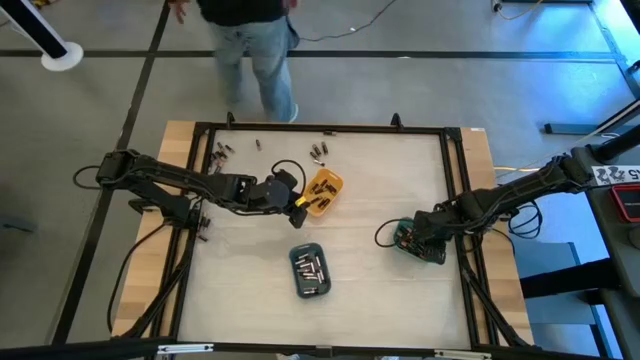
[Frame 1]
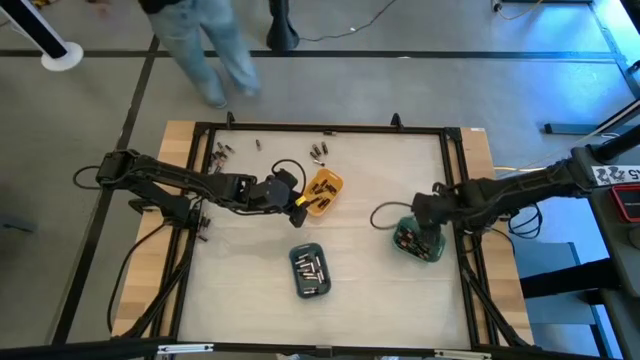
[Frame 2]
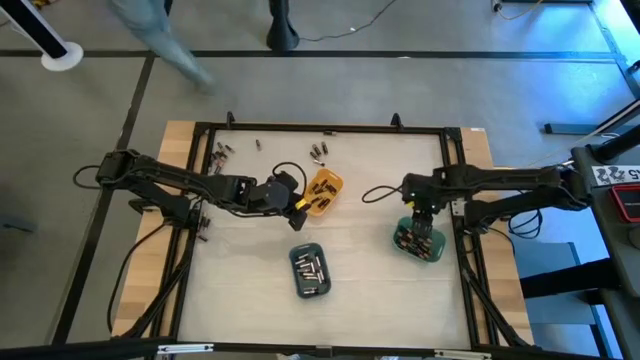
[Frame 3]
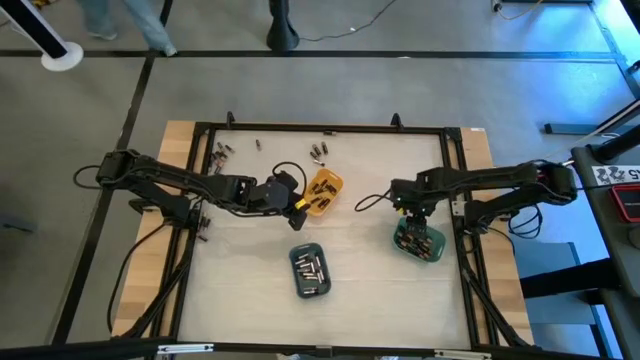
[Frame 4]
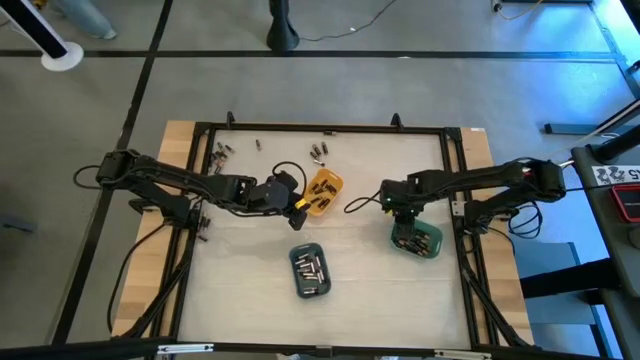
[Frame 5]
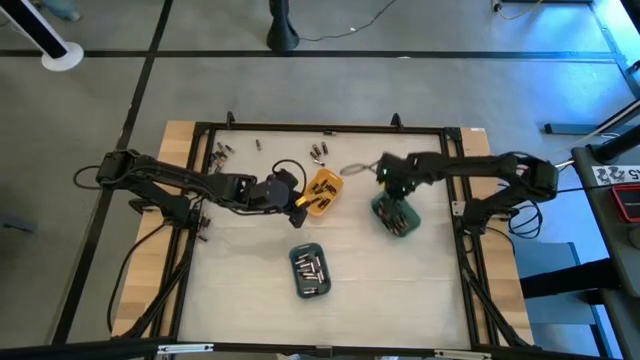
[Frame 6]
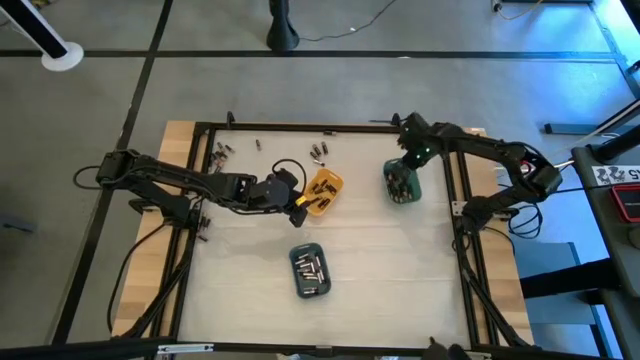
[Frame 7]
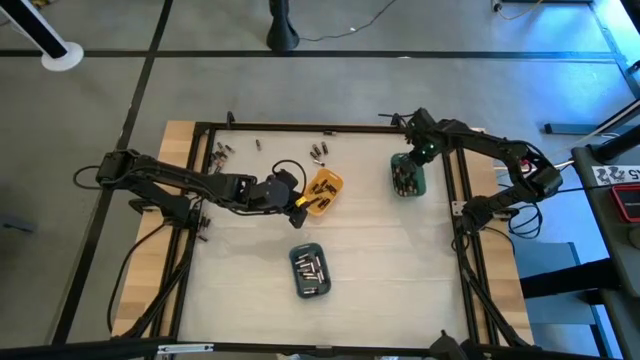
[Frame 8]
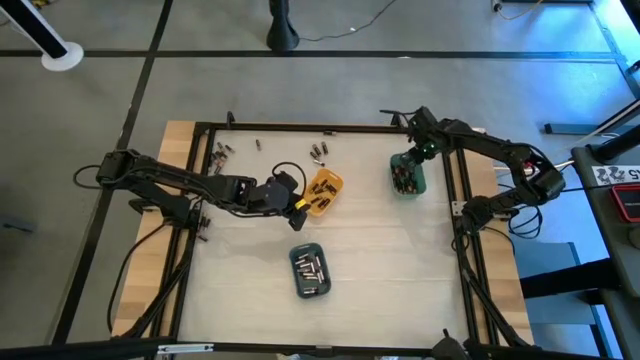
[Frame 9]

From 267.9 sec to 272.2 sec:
Task: Sort batteries
Move the green bin to the top right of the table

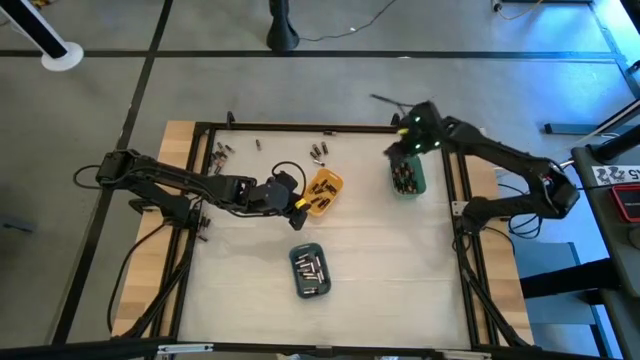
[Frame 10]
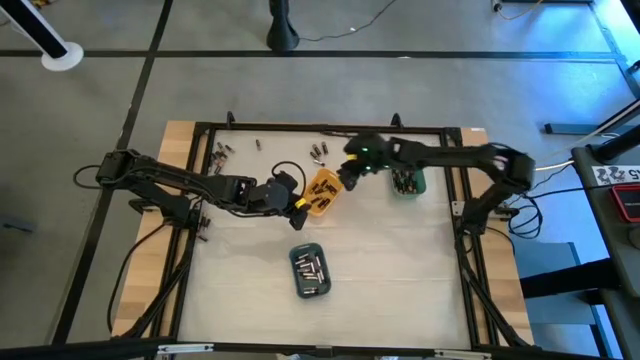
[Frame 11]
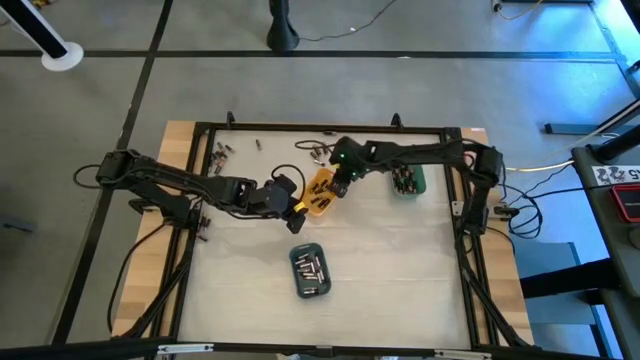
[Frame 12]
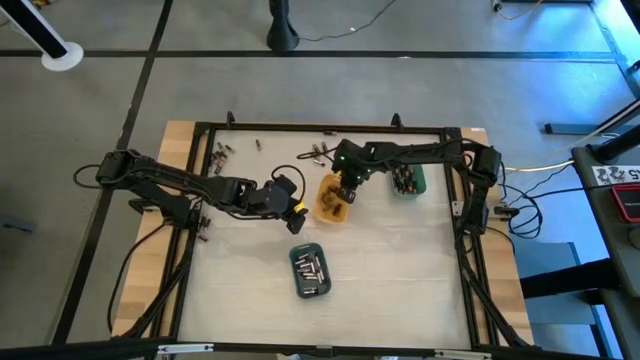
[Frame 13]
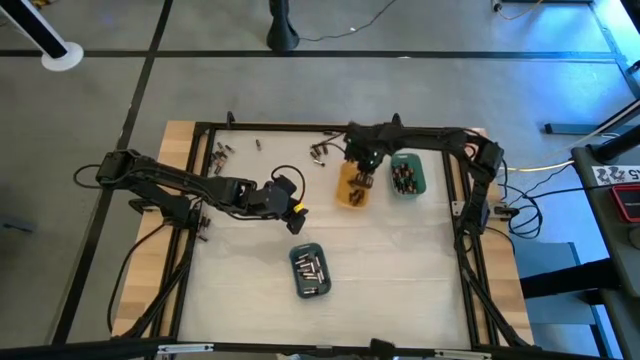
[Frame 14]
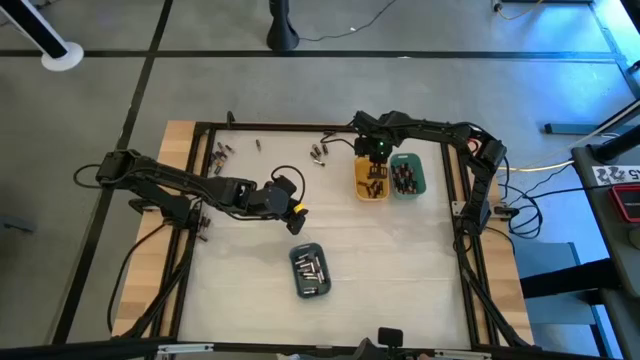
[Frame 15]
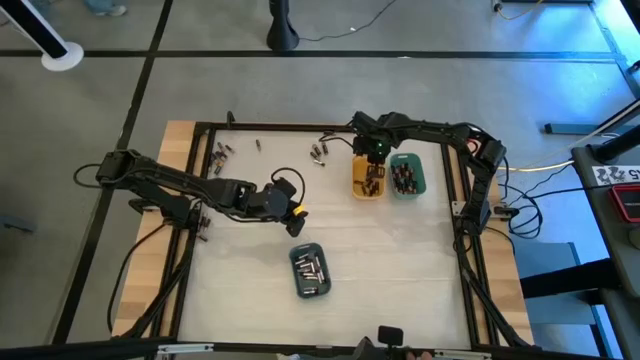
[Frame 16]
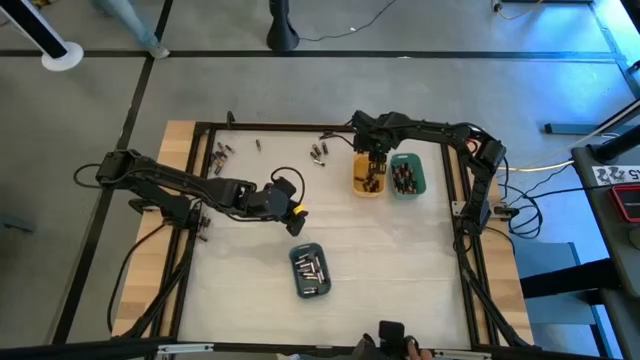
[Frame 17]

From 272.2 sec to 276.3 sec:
Move the yellow bin to the top right of the table

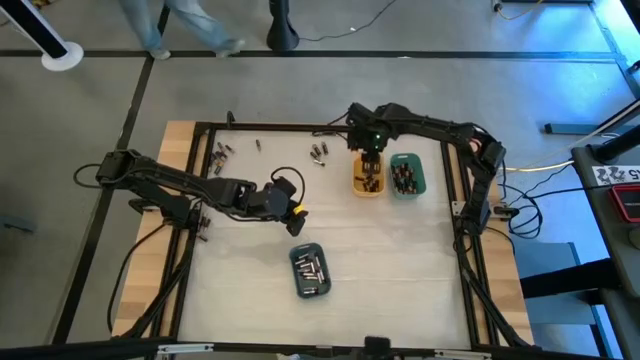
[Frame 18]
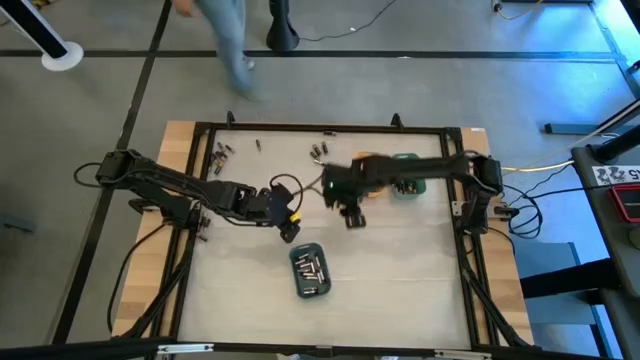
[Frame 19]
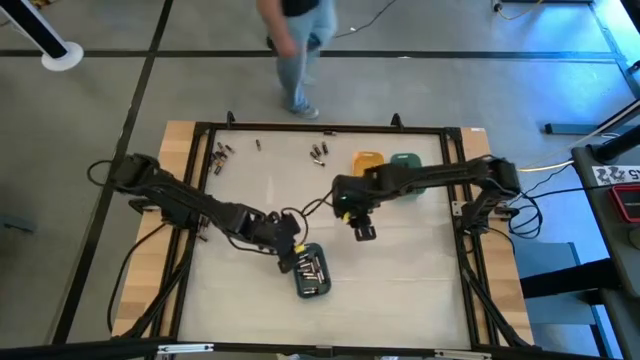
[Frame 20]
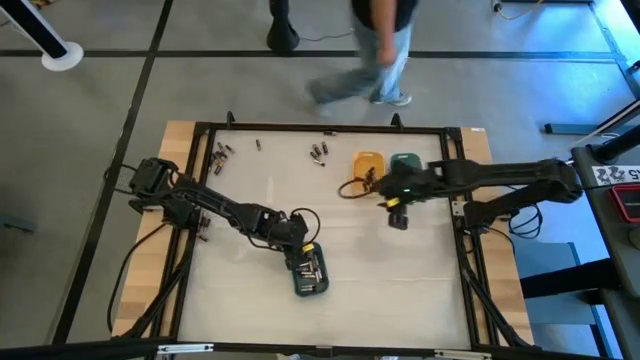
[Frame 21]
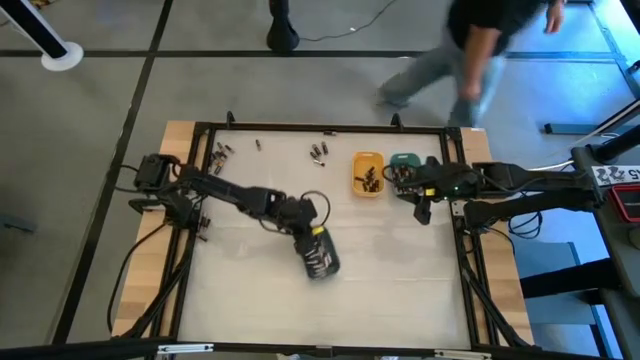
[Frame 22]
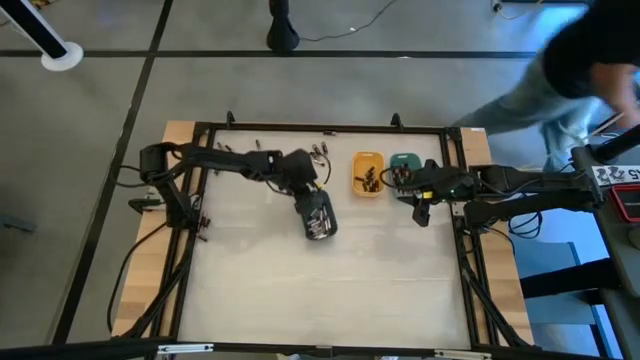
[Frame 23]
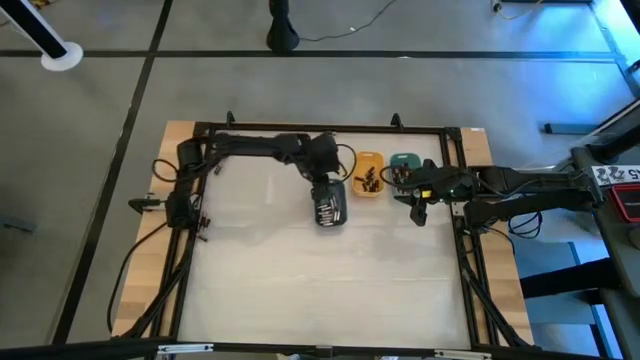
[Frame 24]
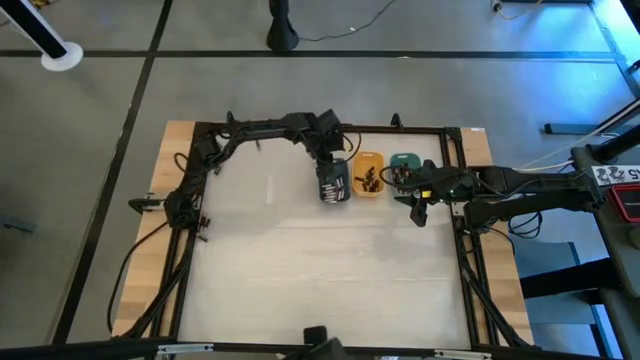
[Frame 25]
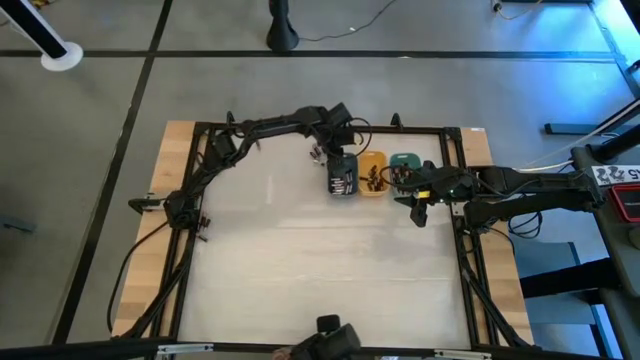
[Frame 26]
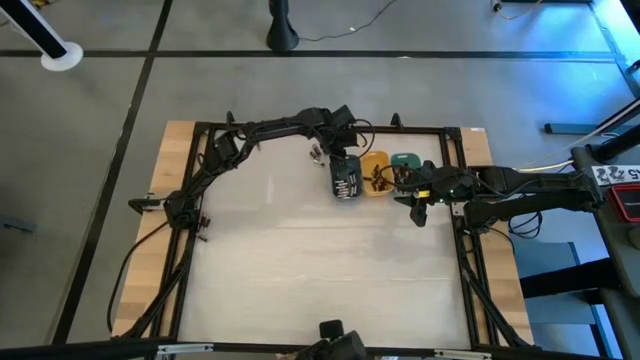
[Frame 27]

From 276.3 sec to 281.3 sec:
Move the blue bin to the top right of the table

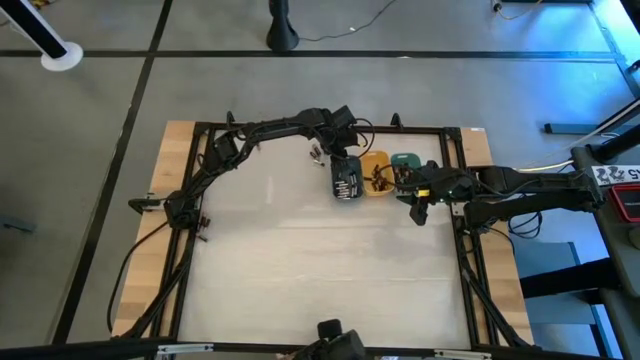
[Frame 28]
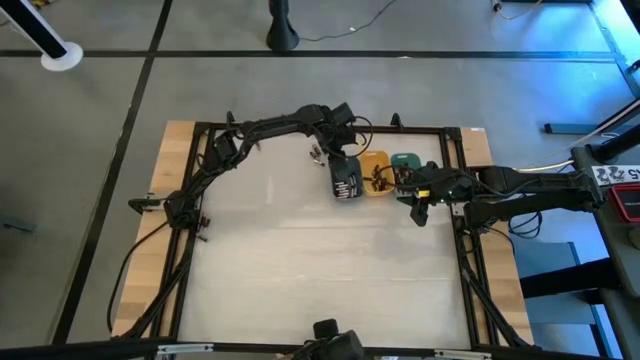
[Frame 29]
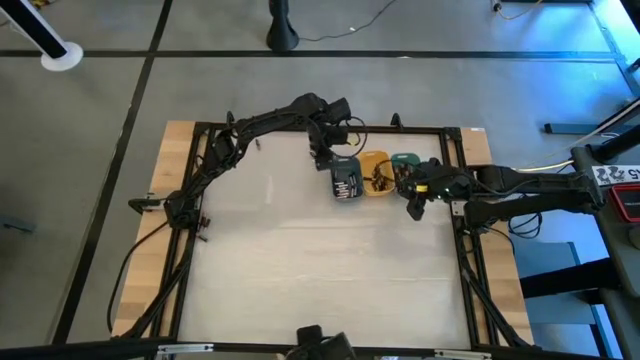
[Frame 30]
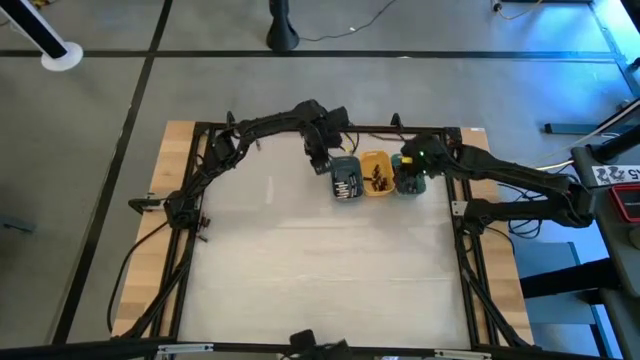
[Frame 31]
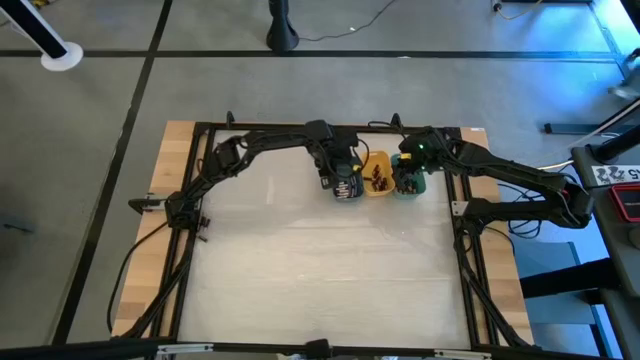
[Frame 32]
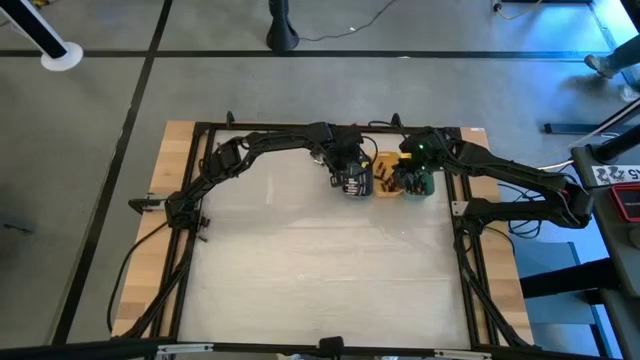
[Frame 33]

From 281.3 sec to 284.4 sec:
Adjust the colored bins

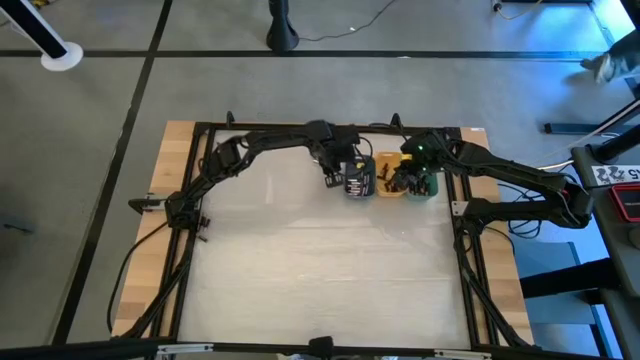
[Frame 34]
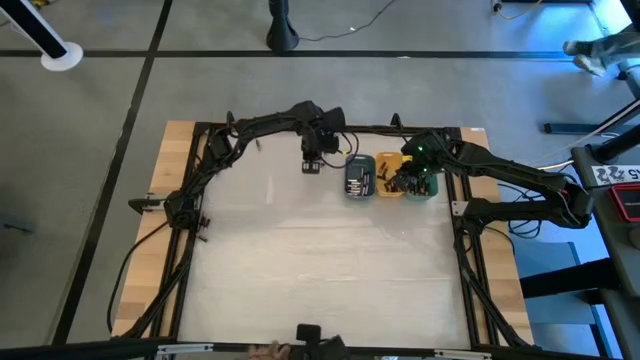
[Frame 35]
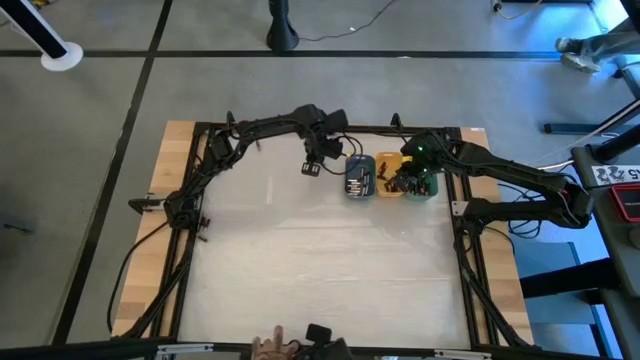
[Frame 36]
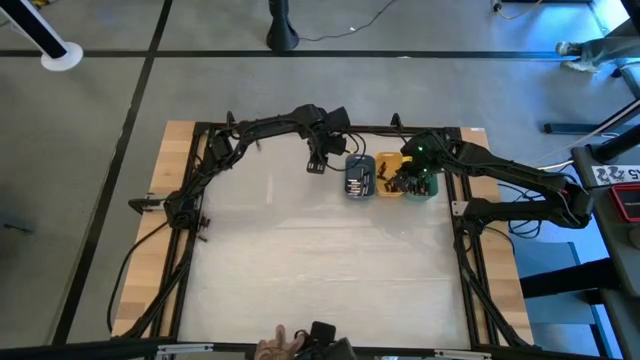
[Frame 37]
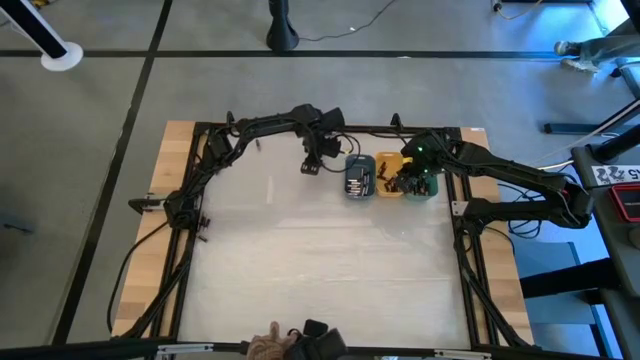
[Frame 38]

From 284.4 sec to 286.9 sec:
Put the silver battery into the blue bin

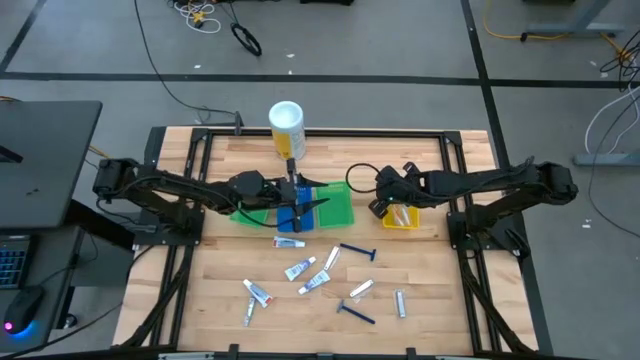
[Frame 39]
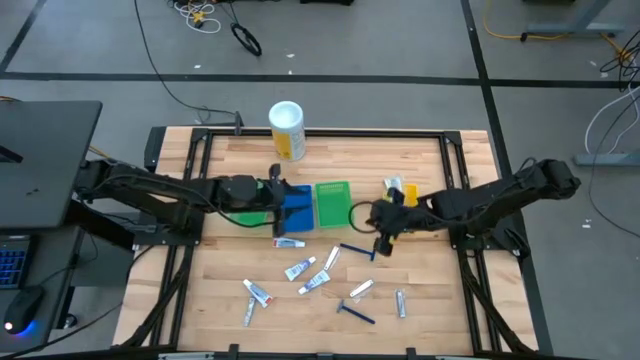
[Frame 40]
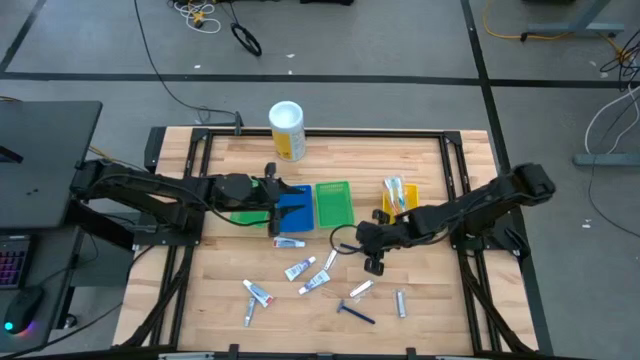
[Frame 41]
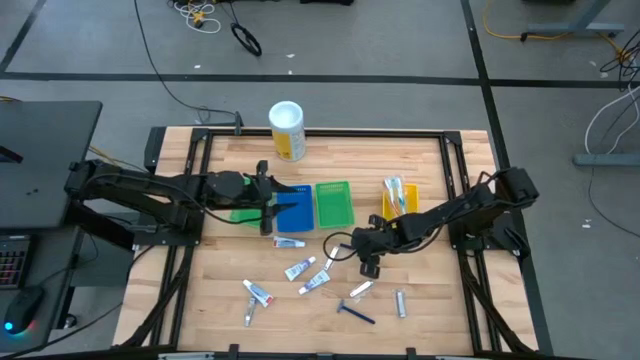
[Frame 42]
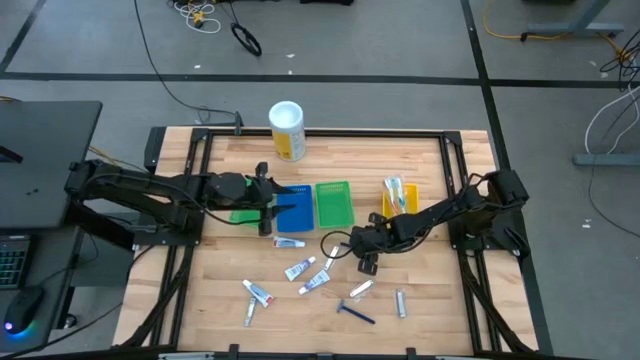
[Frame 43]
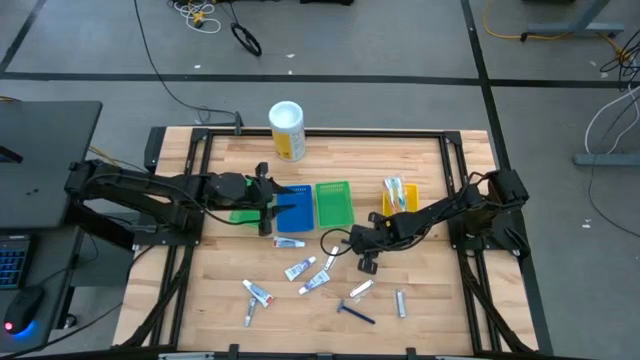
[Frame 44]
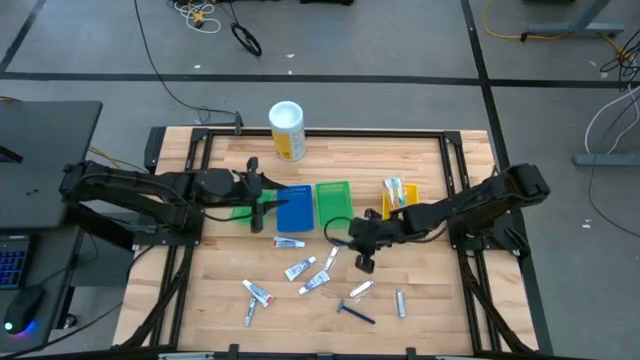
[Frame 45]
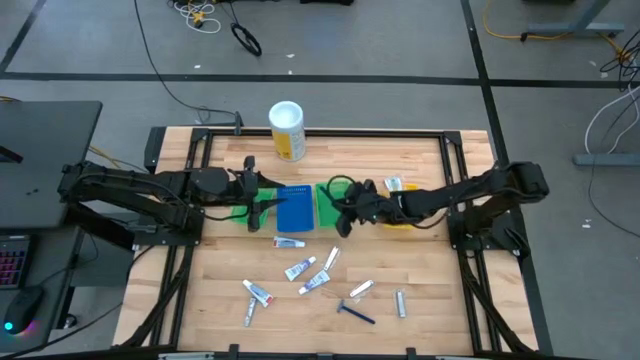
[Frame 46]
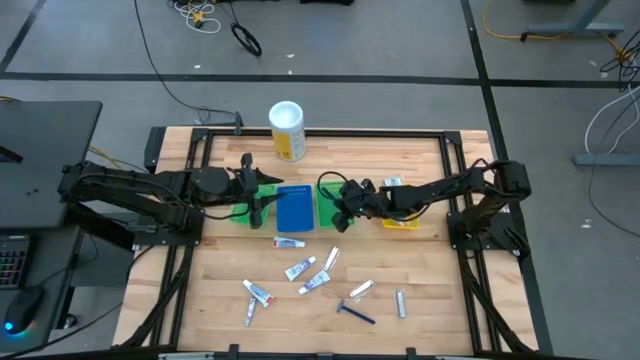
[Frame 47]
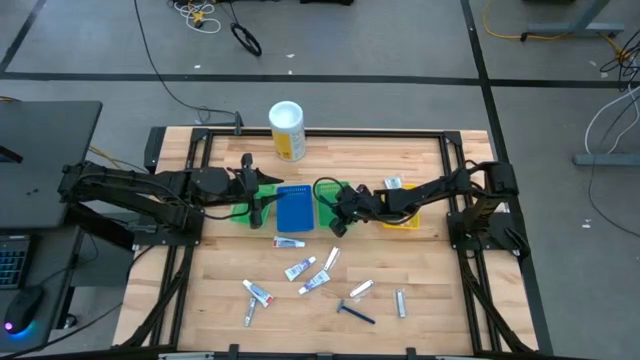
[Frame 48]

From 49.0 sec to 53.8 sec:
Task: Pick & Place Travel size toiletries
Put the blue razor into the right green bin
